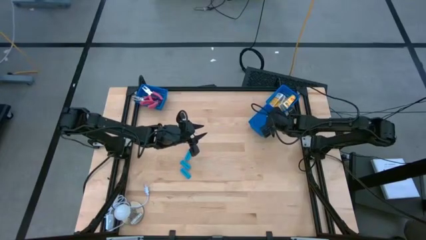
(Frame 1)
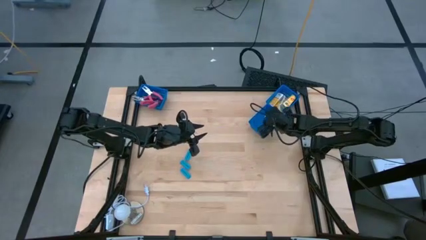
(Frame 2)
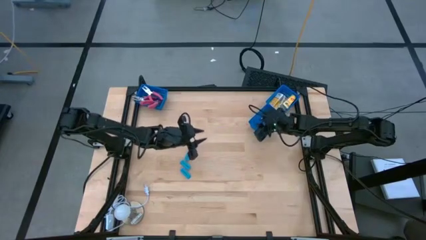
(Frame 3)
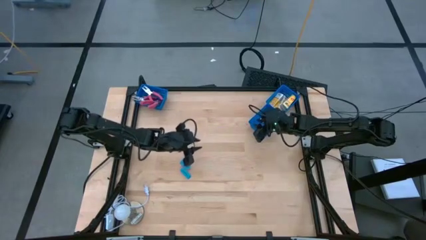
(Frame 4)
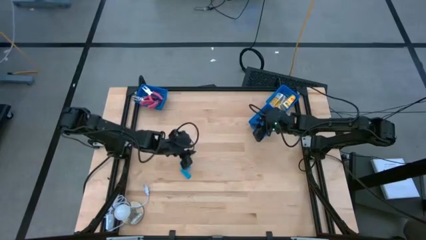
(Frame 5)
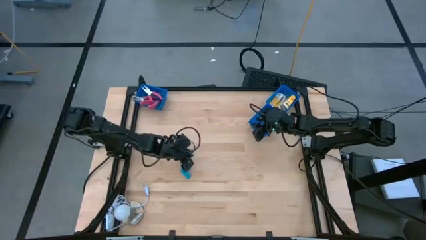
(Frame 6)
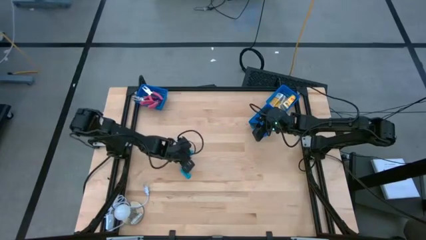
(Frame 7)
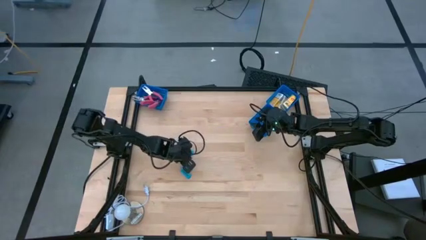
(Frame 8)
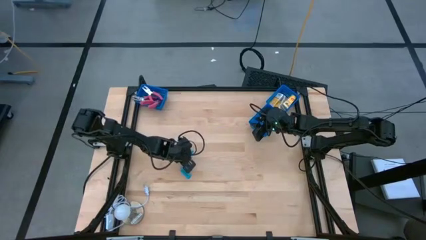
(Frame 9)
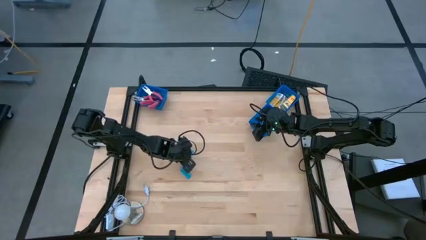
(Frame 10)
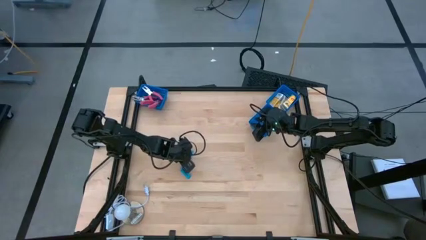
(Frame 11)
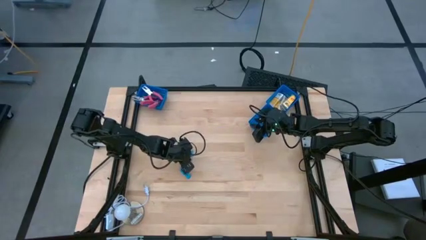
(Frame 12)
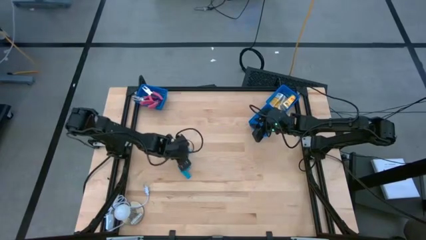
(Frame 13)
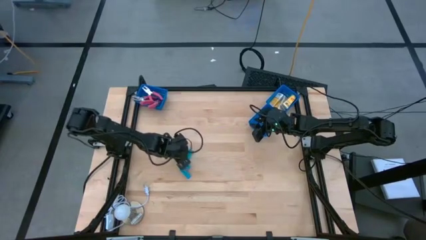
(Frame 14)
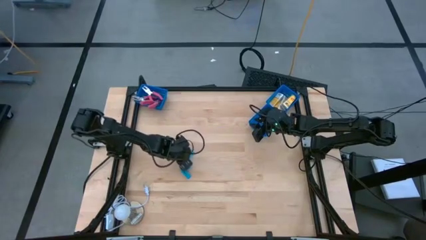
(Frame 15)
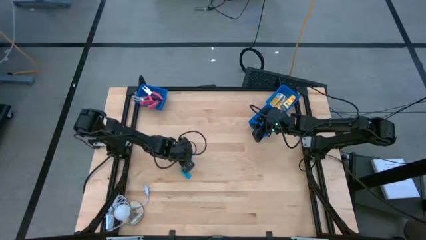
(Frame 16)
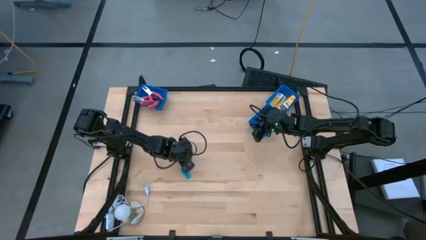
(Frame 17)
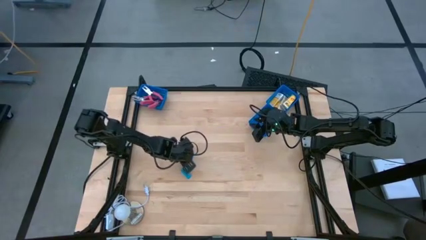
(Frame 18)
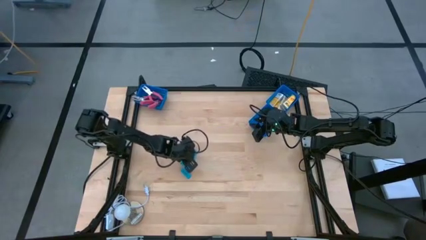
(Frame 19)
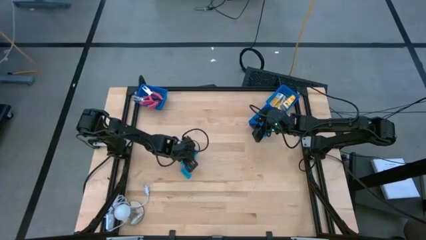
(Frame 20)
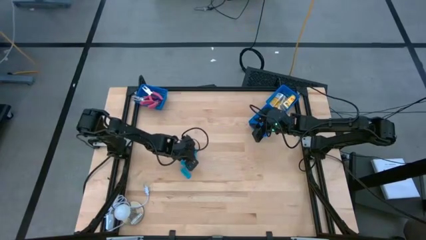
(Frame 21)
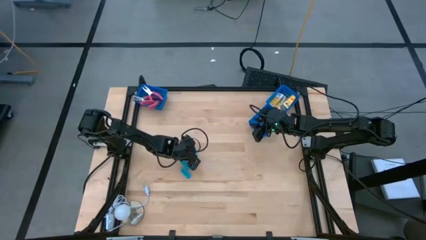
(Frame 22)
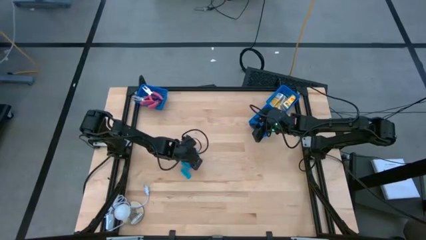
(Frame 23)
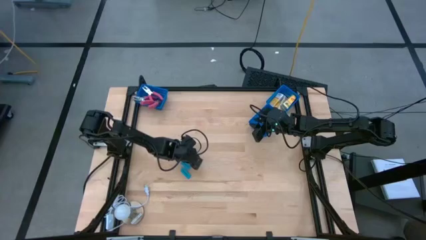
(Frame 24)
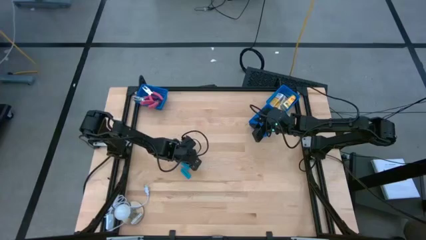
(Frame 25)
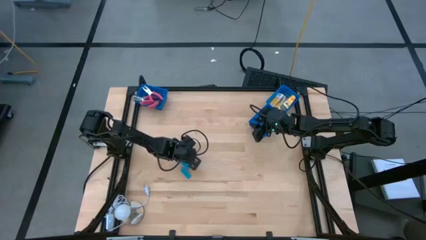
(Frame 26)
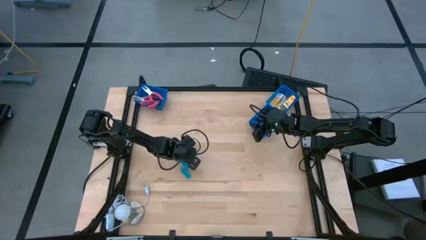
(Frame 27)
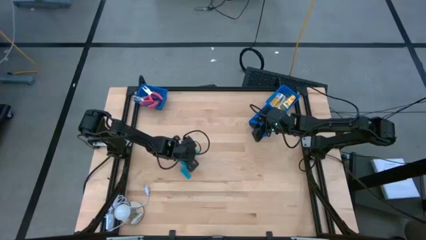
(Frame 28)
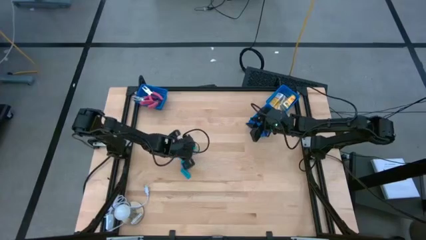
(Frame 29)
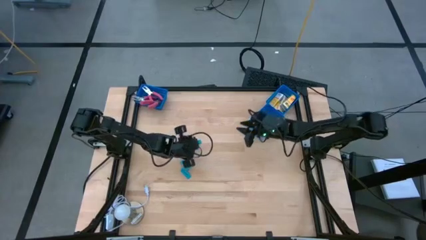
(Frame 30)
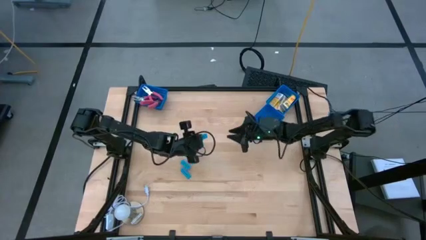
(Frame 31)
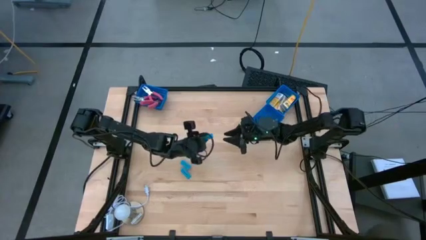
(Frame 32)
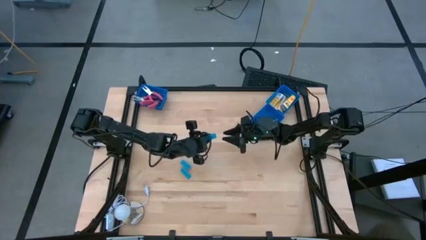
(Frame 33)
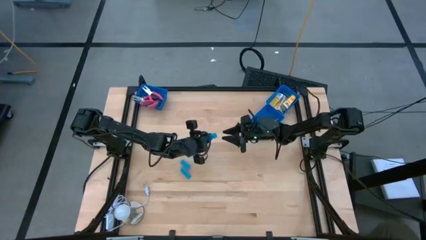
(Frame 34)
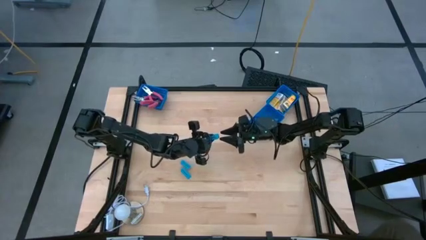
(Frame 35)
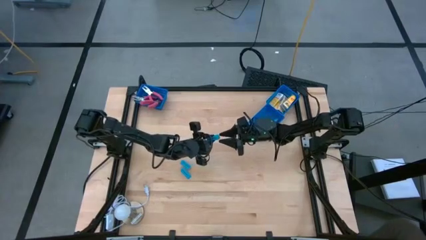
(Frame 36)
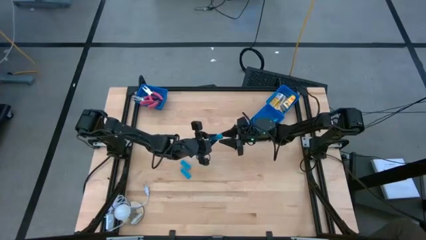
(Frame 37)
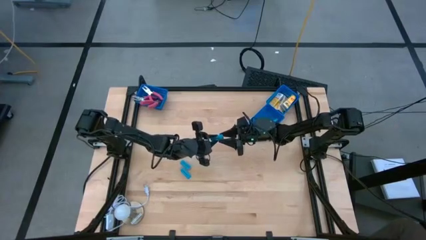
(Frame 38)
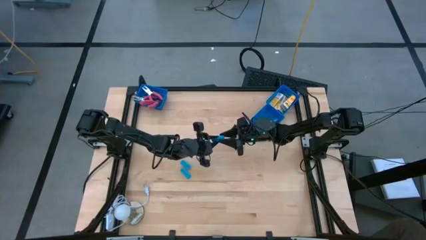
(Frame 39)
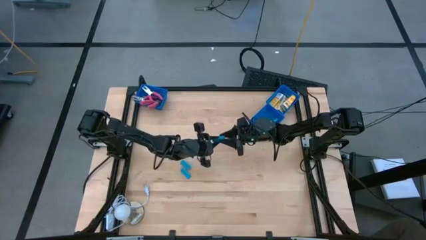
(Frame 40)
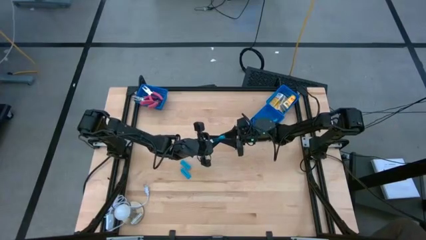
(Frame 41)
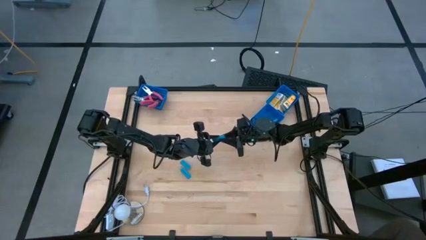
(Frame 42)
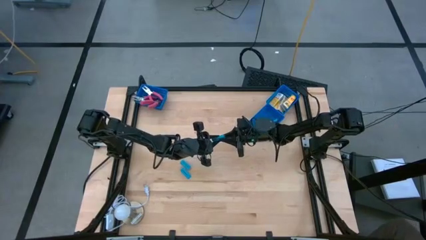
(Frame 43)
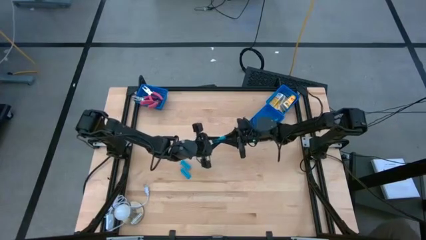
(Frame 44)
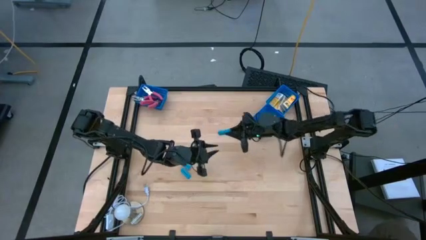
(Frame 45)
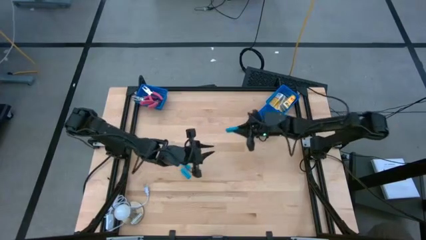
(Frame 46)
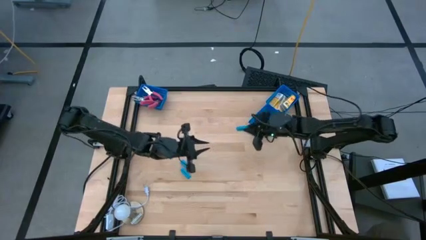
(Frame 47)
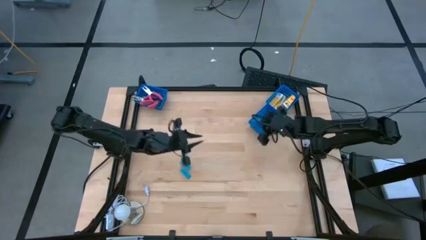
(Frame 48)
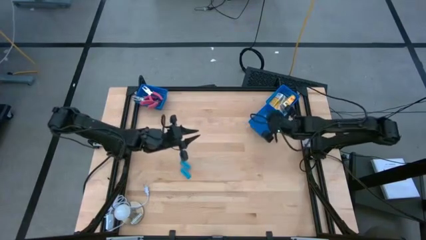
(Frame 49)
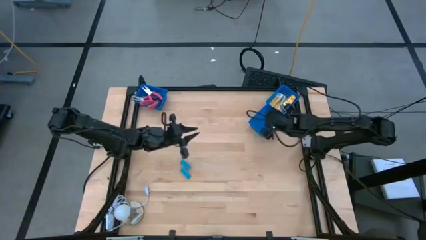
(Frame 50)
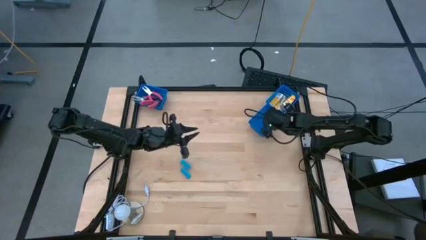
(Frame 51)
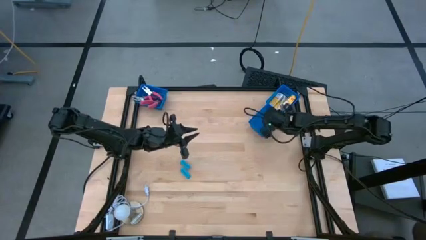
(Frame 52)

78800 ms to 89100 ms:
Task: Pick & Place School Supplies
Put the blue eraser into the bottom right blue basket

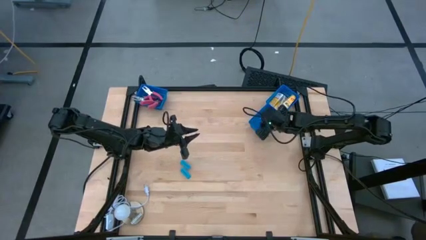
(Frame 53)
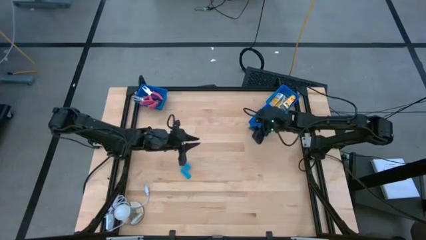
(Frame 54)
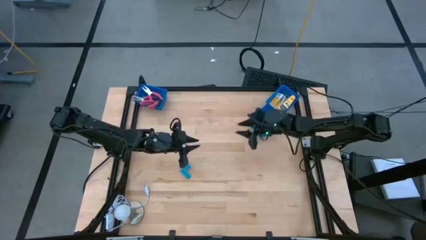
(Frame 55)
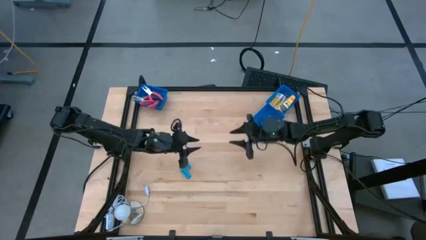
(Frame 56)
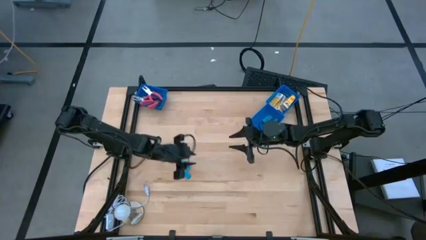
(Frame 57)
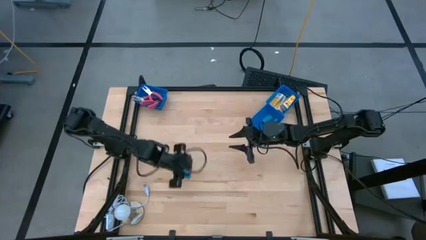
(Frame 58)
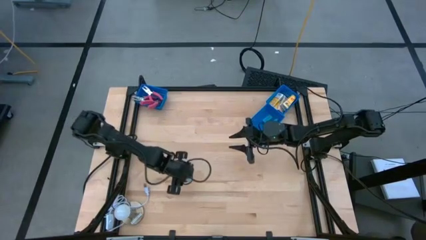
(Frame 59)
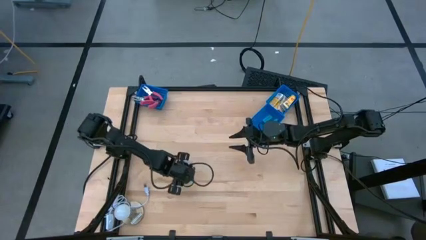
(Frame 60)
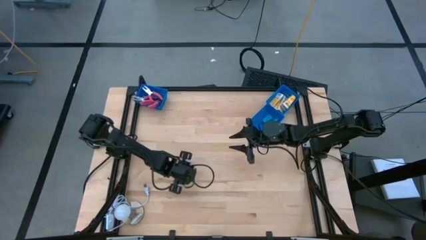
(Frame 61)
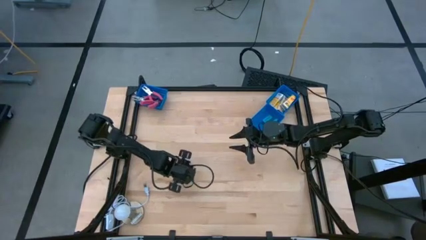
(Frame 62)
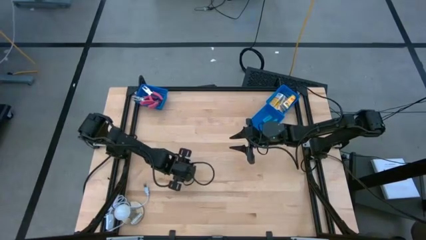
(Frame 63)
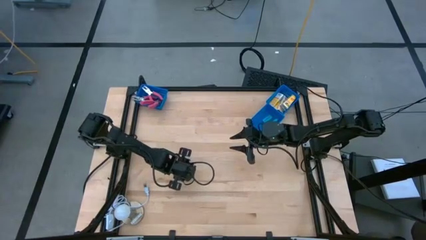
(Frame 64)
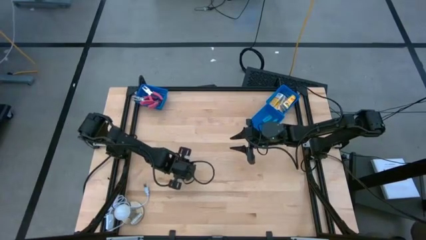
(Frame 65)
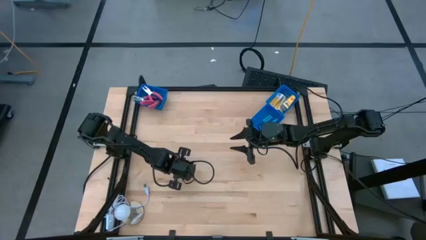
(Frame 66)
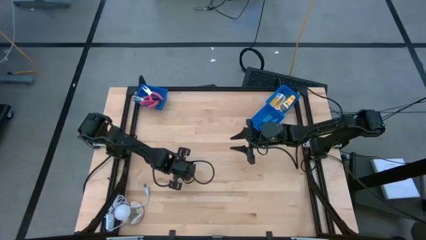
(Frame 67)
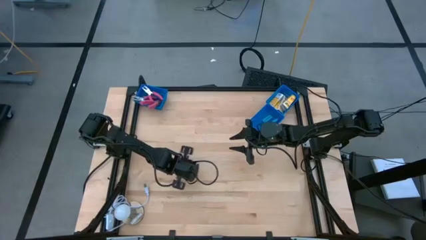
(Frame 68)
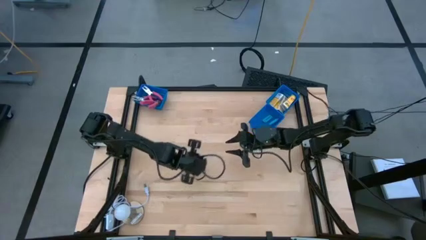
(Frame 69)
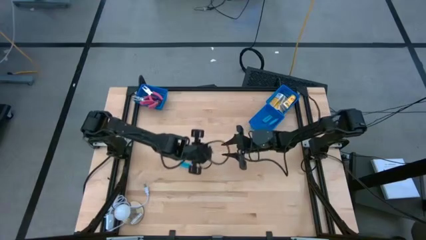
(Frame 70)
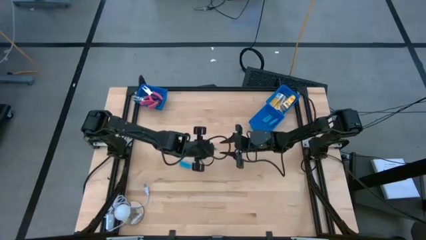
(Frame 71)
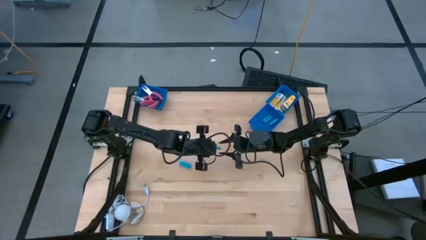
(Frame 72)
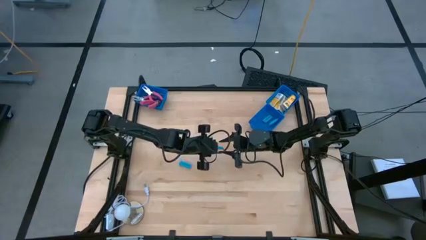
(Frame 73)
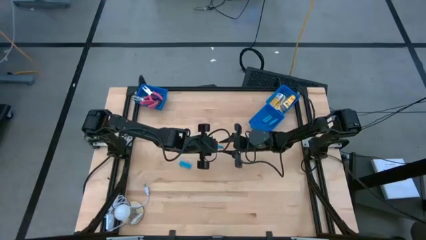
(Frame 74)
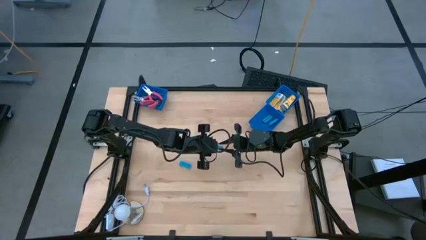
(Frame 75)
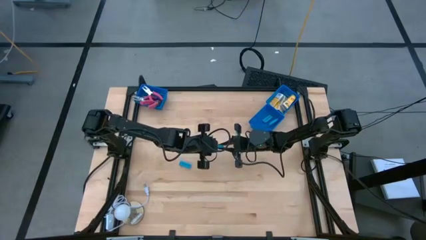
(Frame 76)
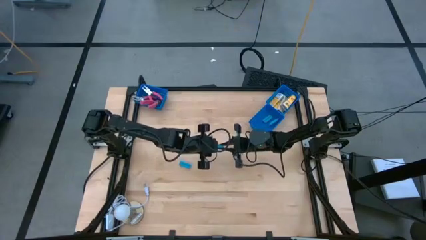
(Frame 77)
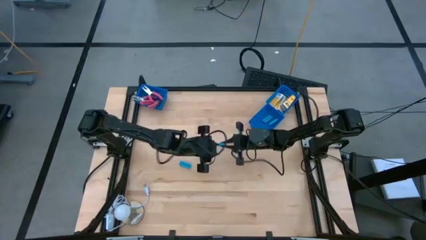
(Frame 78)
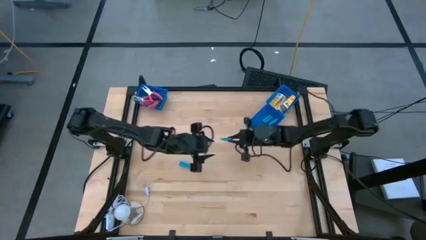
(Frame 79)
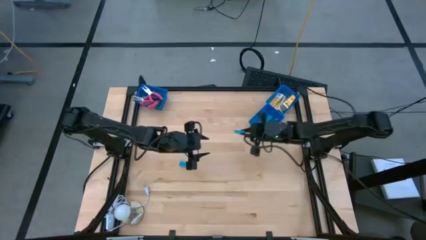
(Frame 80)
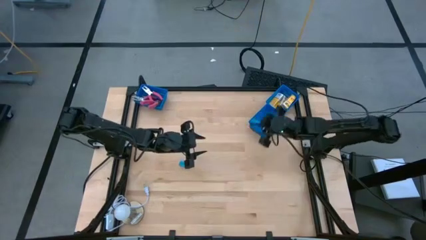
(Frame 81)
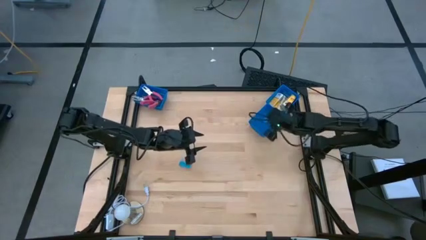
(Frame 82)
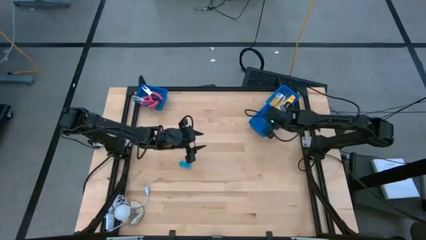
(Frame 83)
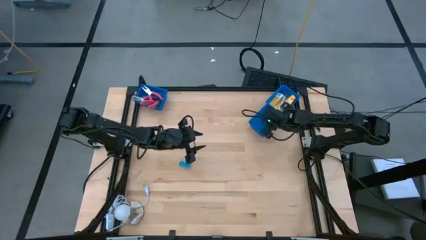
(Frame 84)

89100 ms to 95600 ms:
Put the blue eraser into the bottom right blue basket
